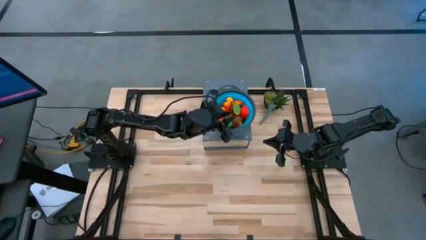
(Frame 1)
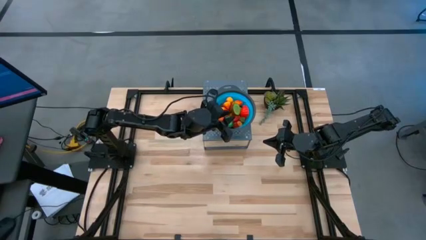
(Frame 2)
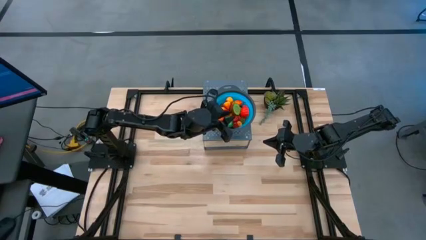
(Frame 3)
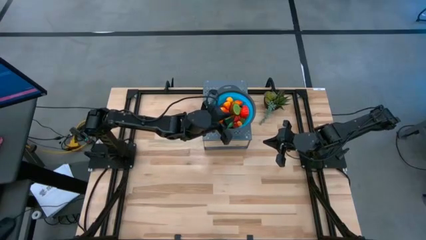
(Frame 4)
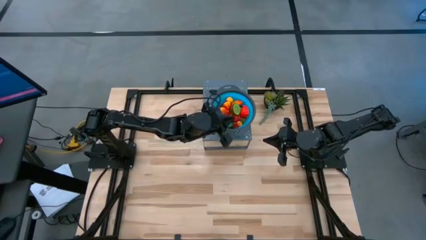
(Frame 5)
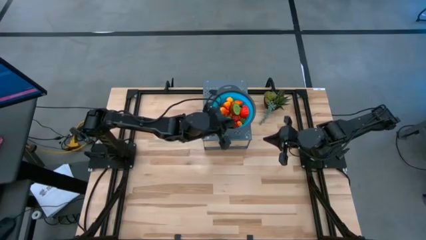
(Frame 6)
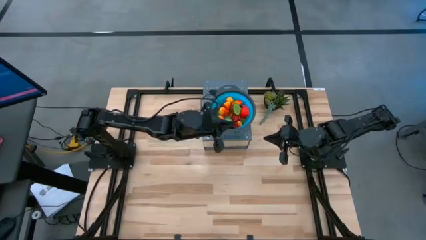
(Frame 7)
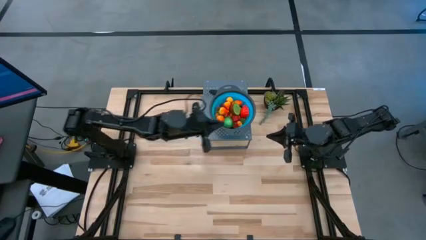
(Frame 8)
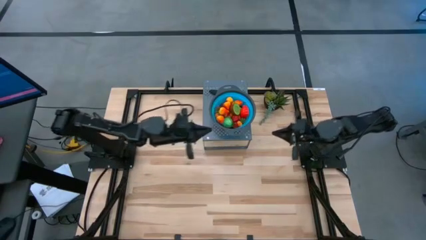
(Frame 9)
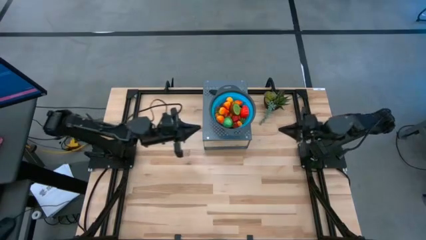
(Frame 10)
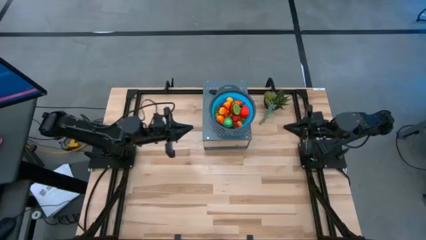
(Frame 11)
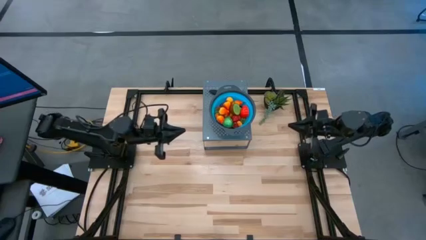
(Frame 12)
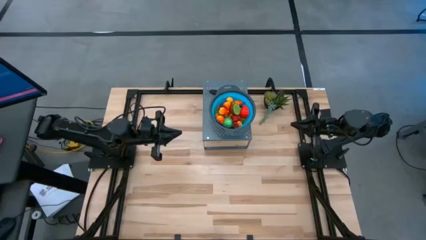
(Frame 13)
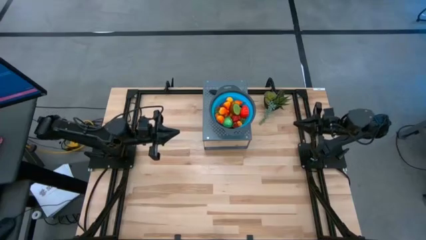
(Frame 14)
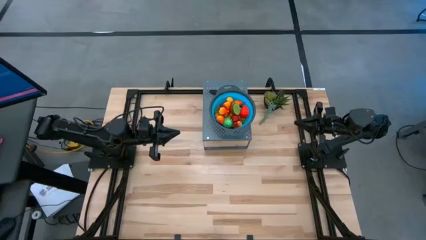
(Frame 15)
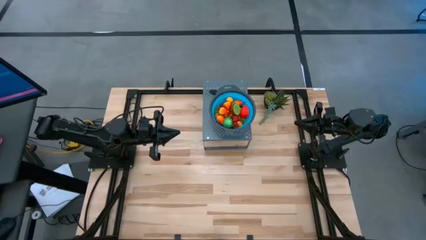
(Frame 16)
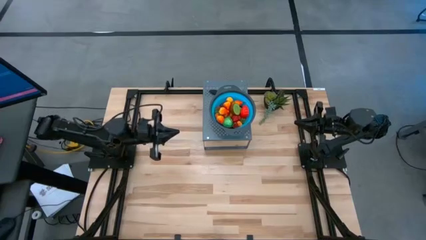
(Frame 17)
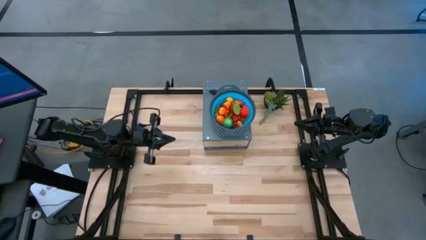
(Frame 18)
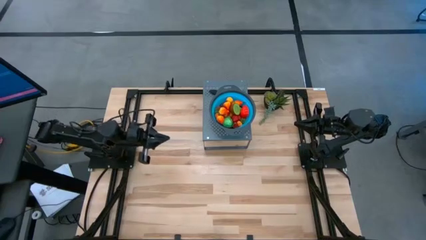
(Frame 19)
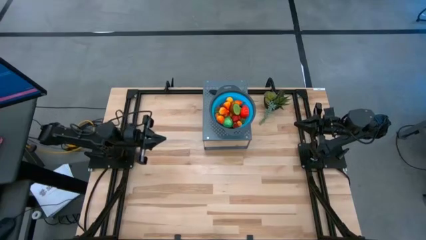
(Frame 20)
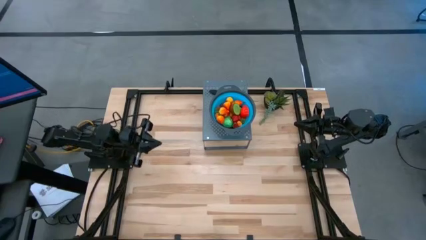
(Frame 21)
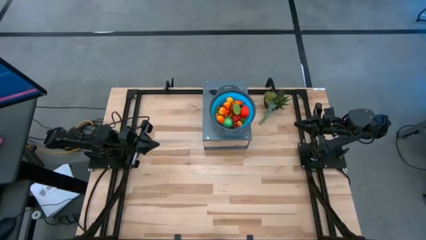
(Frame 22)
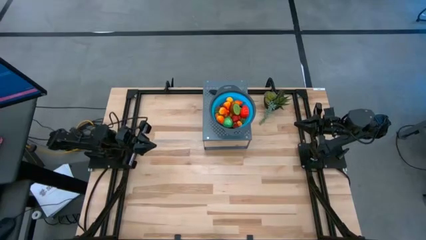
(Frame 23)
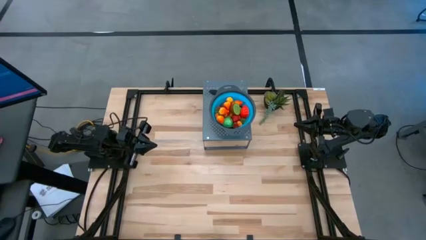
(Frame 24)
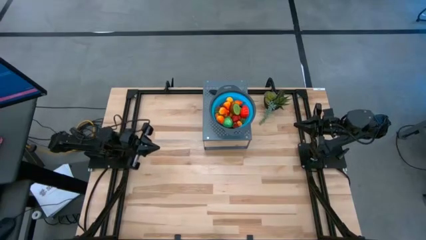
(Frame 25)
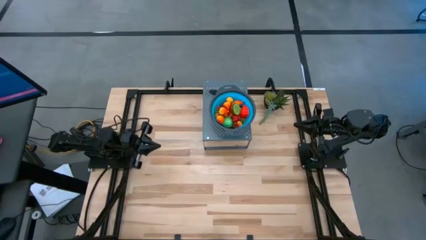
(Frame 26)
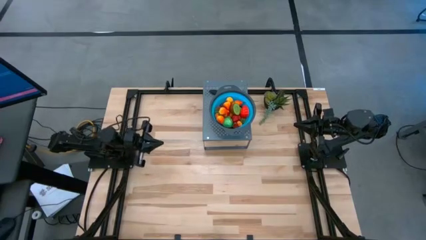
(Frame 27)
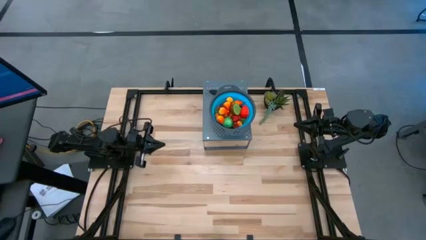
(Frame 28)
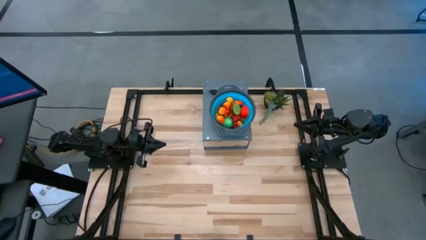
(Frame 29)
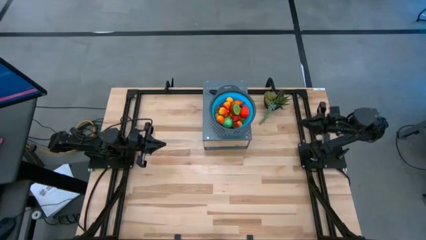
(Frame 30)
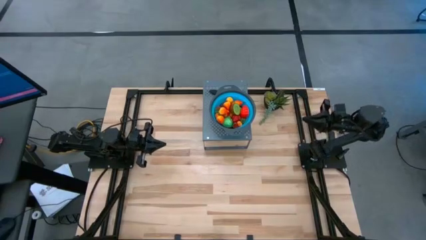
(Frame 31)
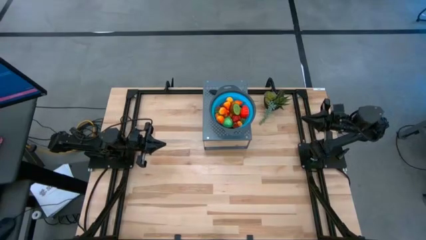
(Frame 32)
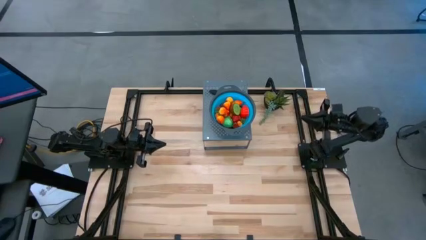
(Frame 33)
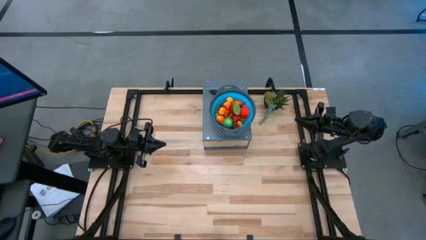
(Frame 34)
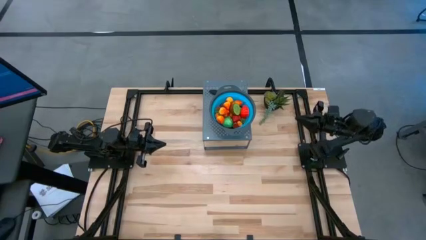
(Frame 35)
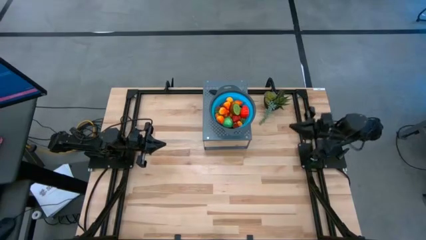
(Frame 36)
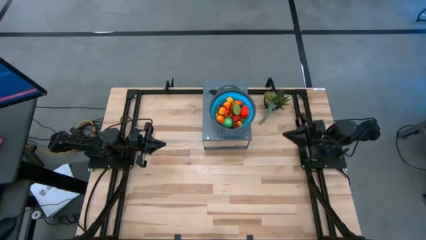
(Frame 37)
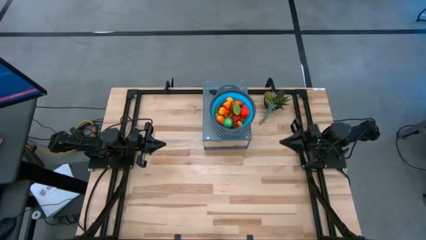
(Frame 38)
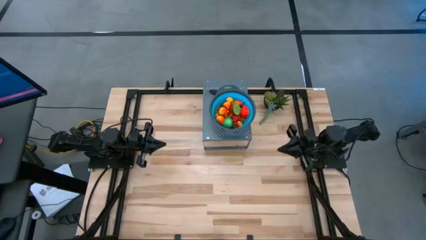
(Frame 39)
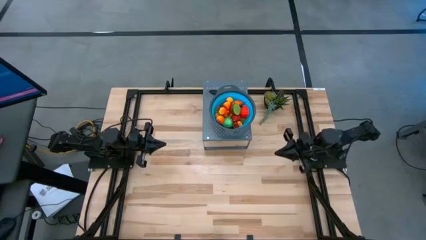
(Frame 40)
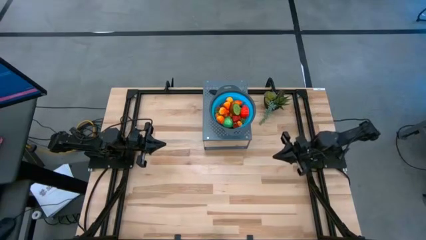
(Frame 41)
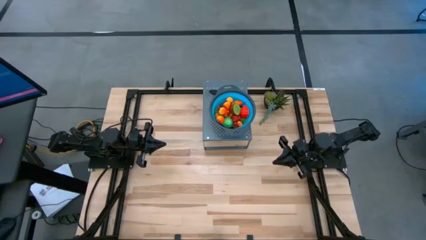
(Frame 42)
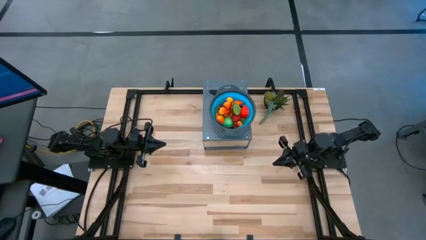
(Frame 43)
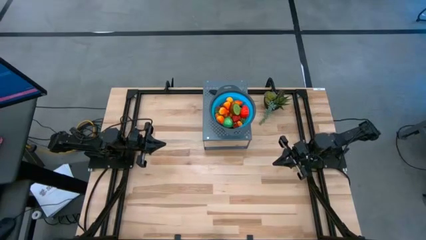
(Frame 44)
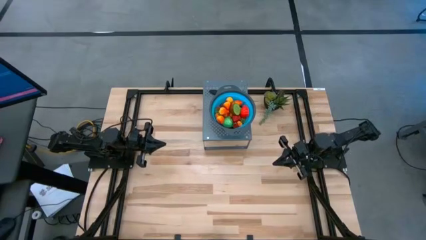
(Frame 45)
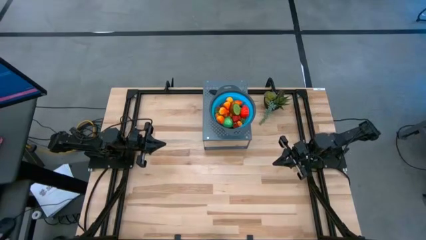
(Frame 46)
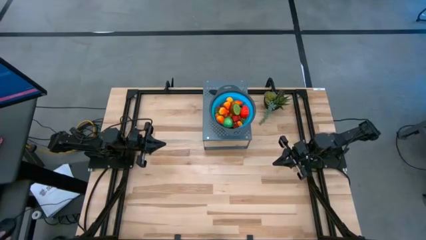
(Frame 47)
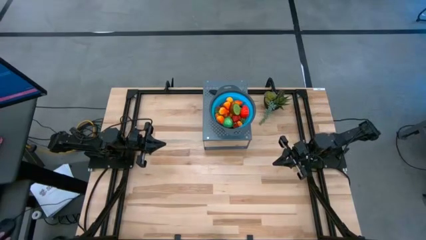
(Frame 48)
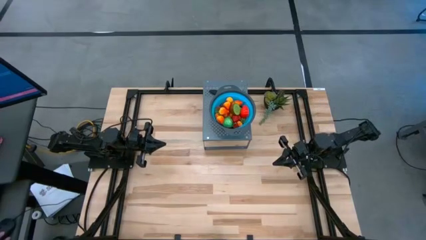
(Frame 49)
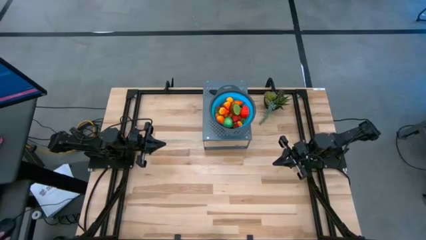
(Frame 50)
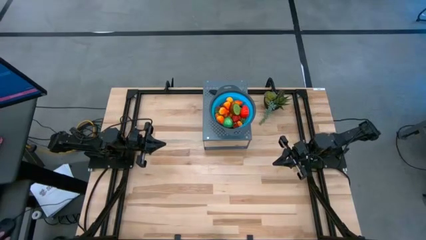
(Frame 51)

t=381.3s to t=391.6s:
Task: Pick & Place Fruit
Return to Home Position
